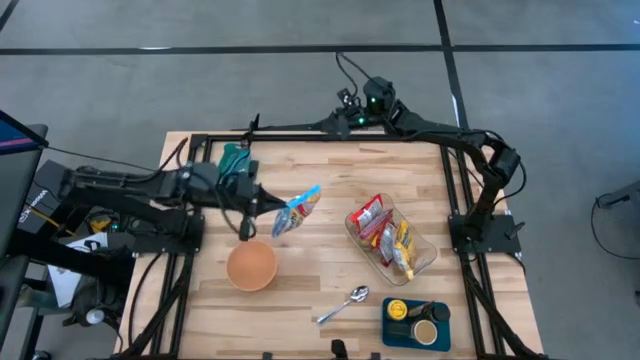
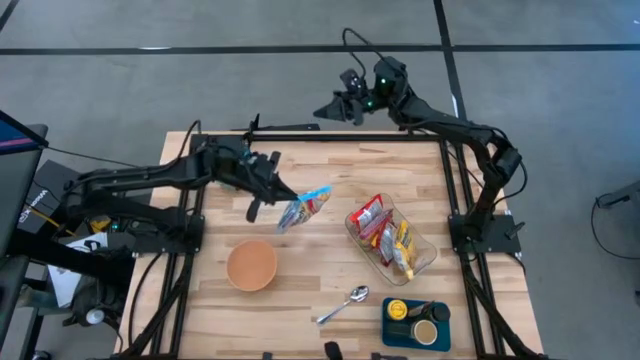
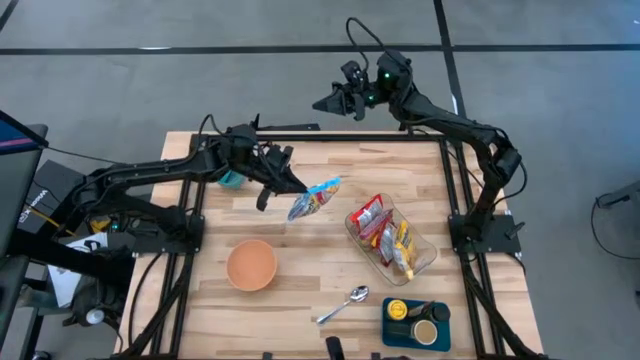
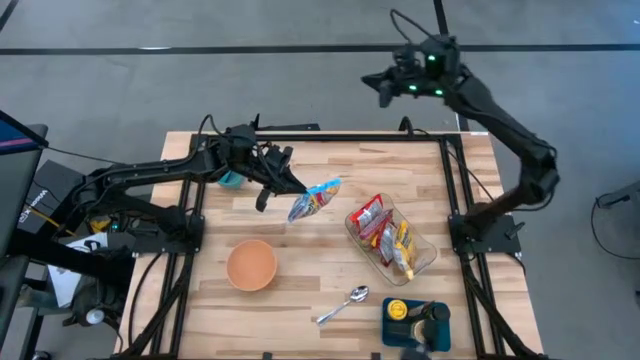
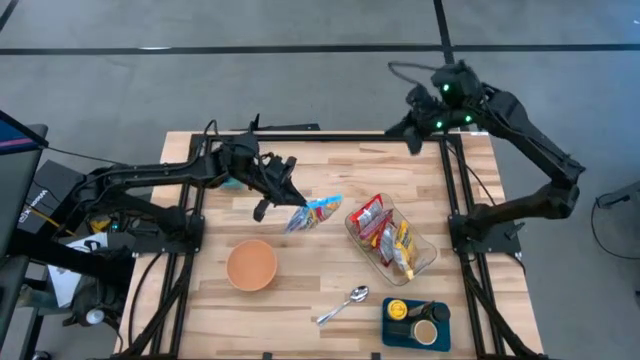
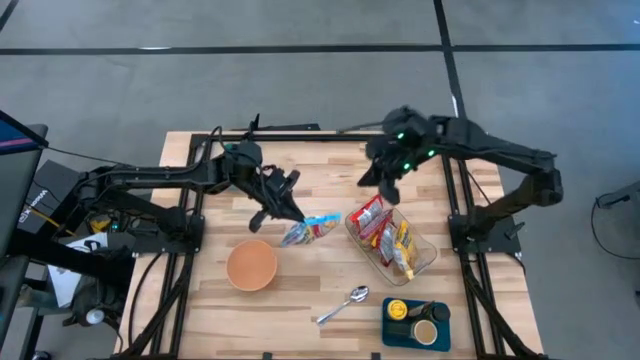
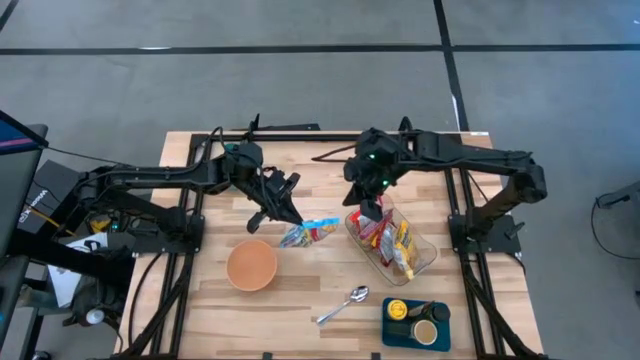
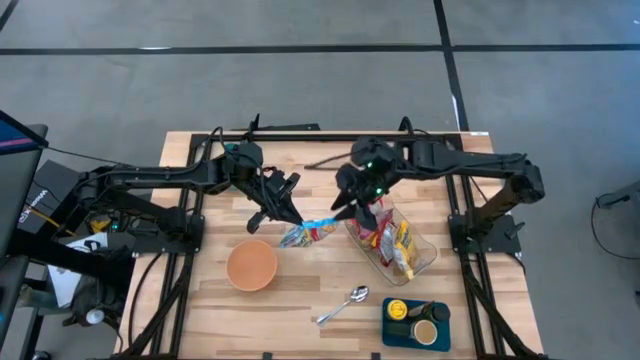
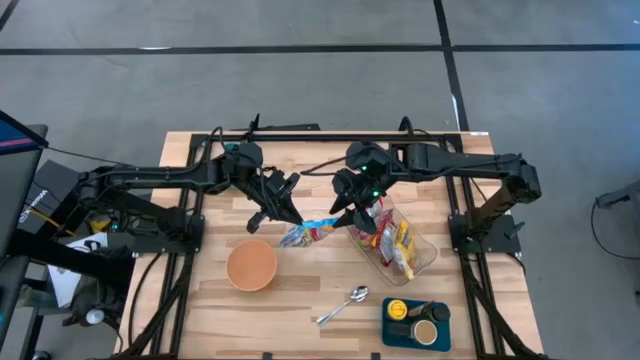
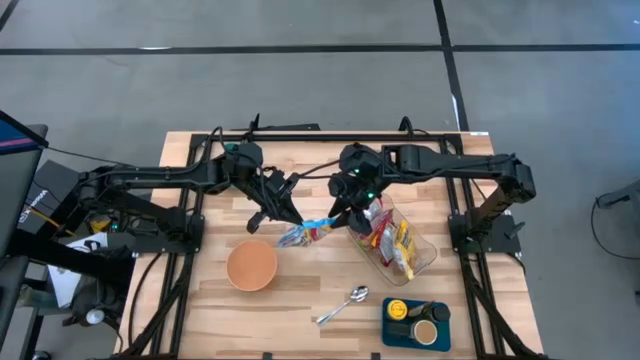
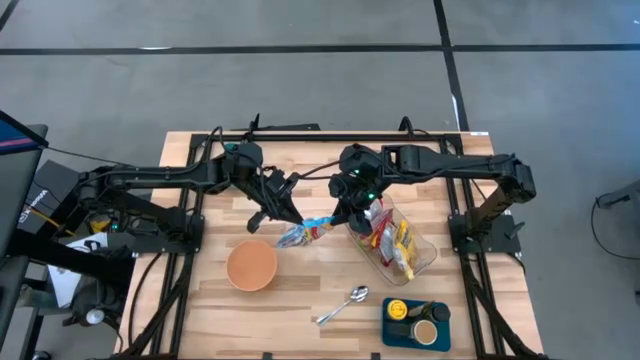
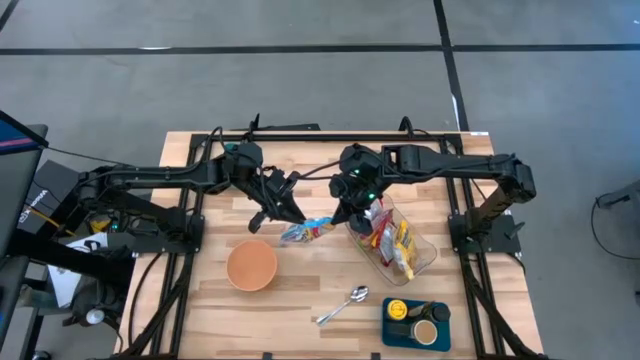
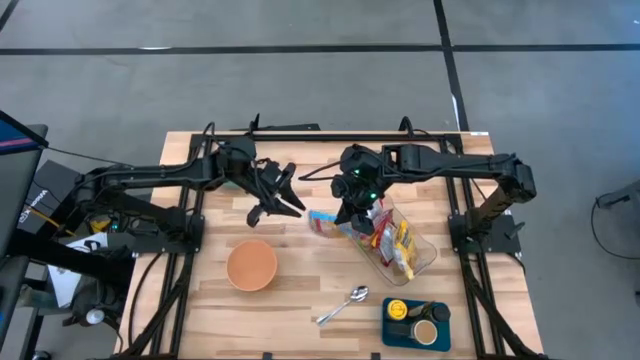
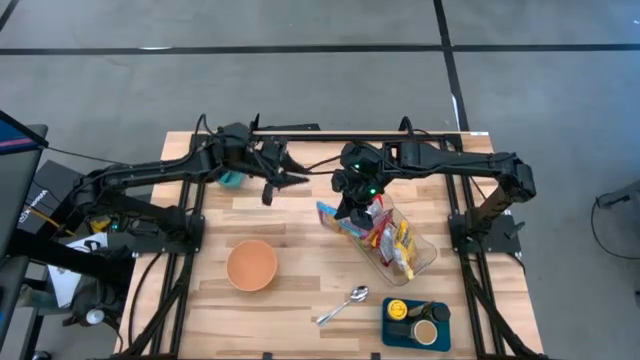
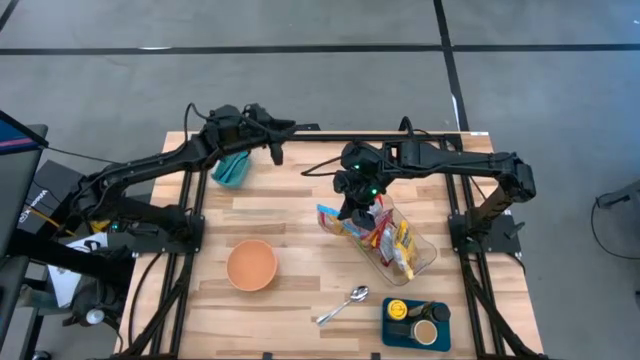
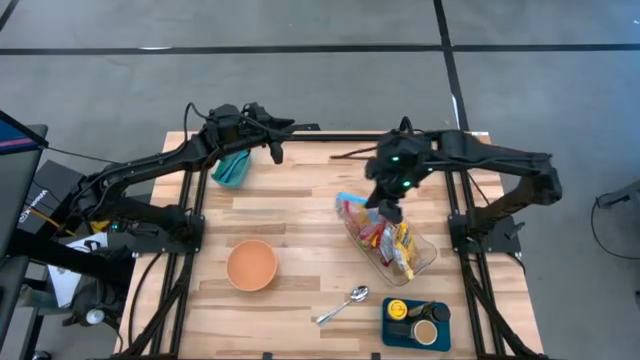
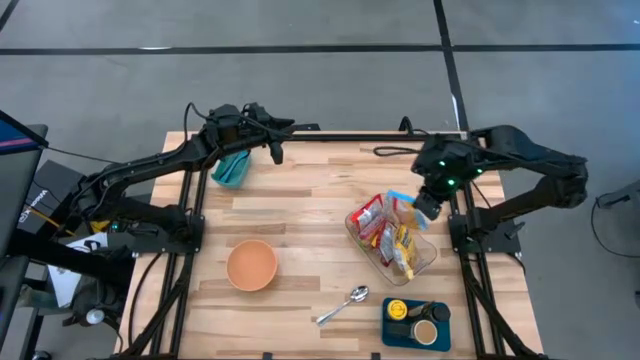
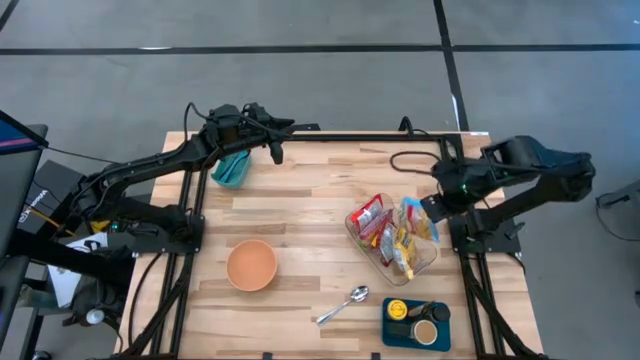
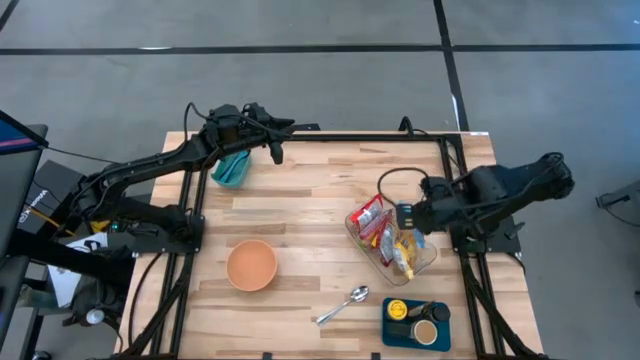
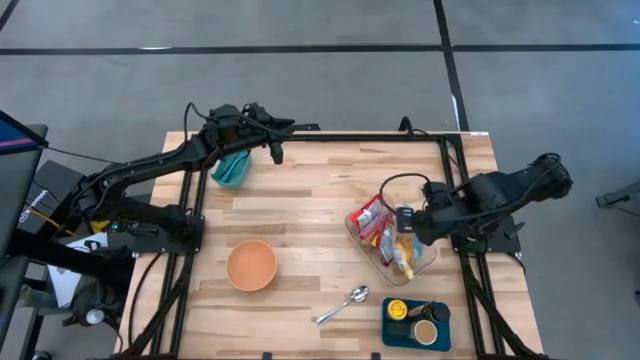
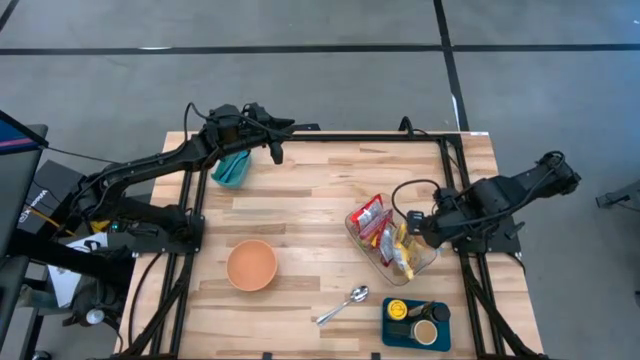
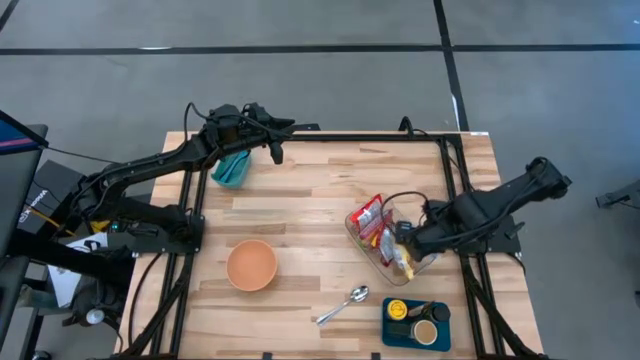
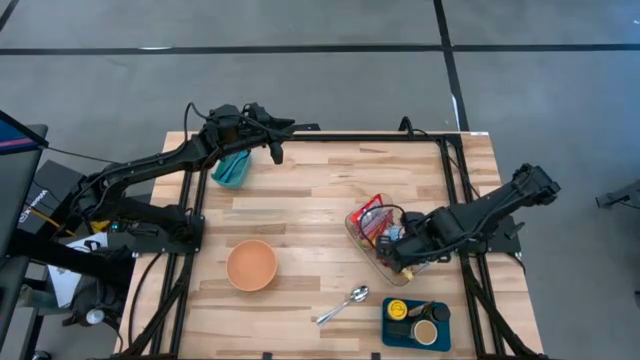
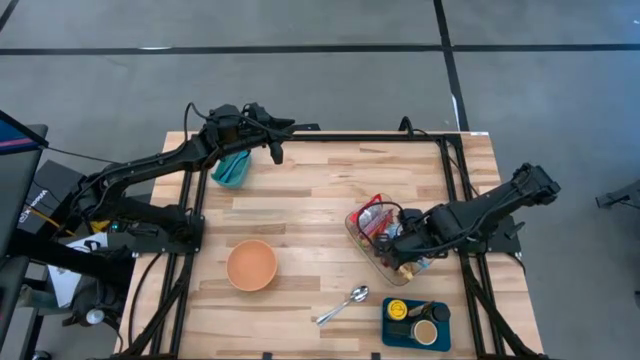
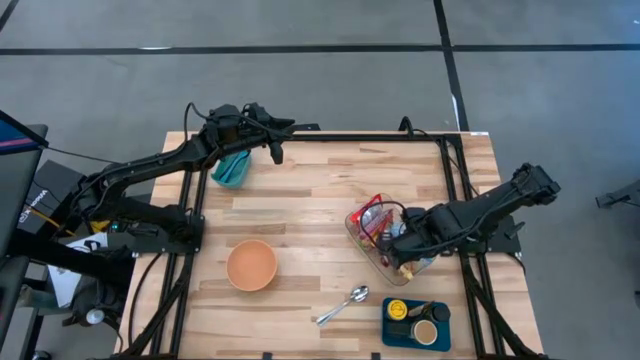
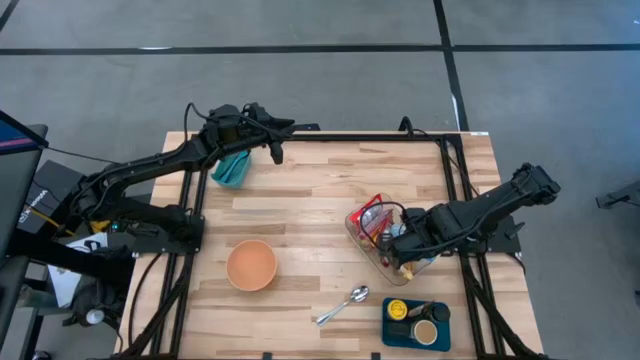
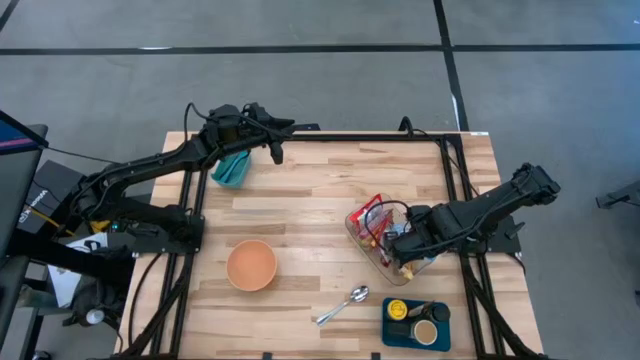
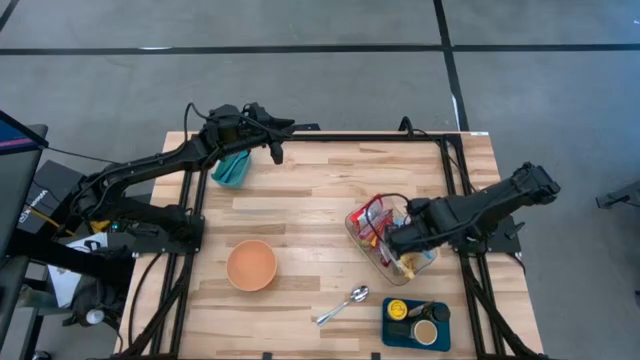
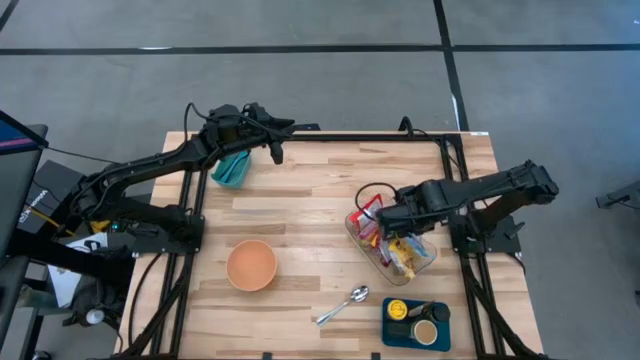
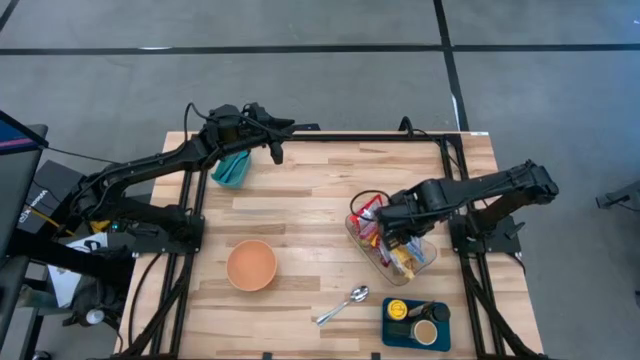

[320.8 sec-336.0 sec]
Task: Pick & Place Food Item
Put the blue noodle pack into the transparent bin

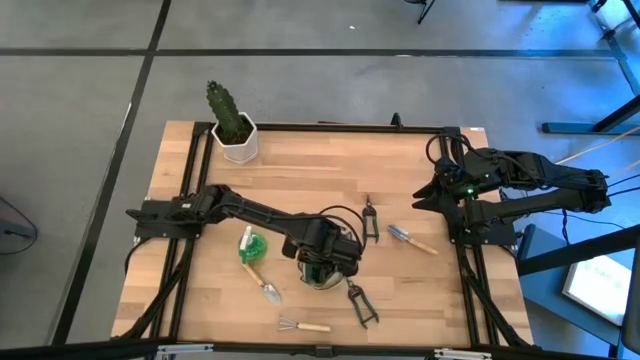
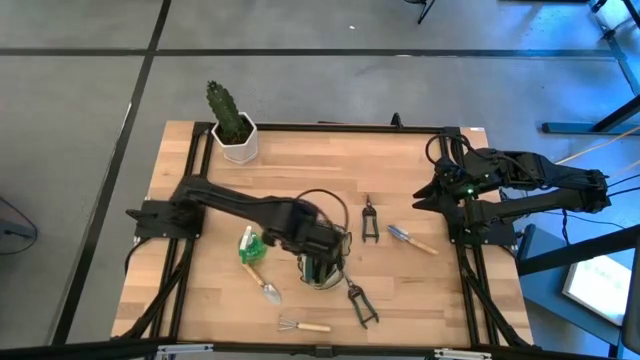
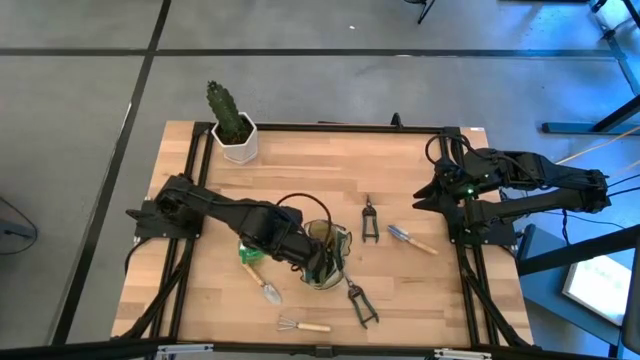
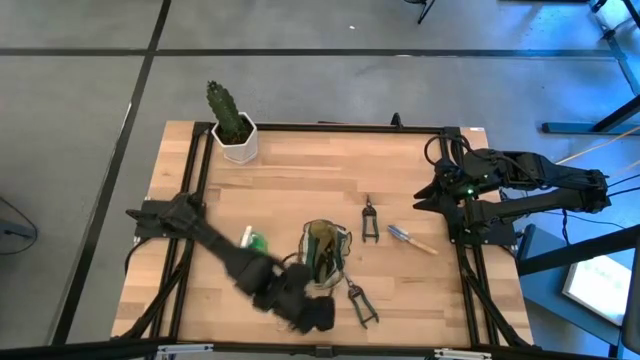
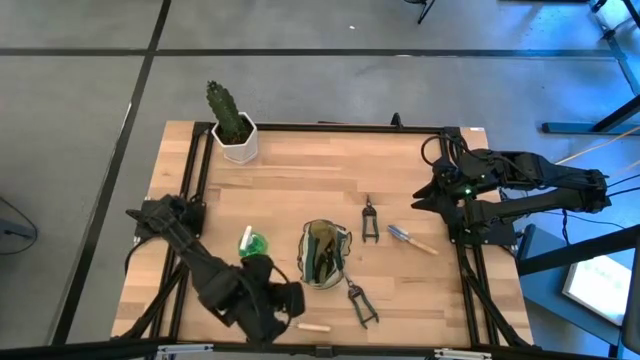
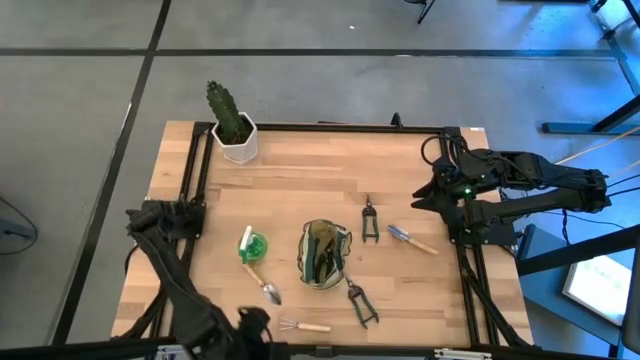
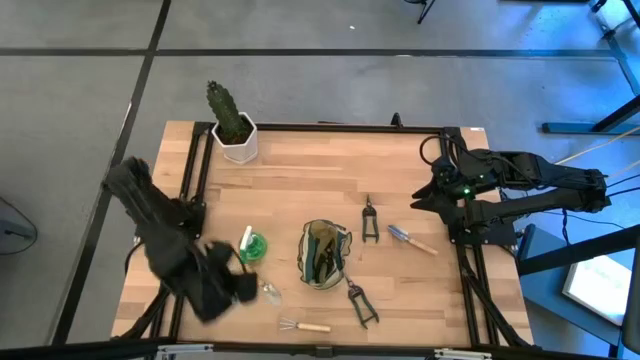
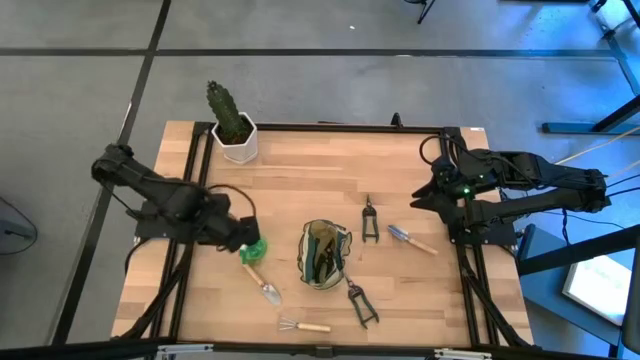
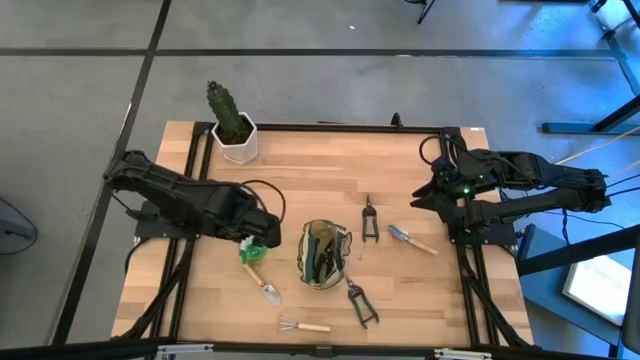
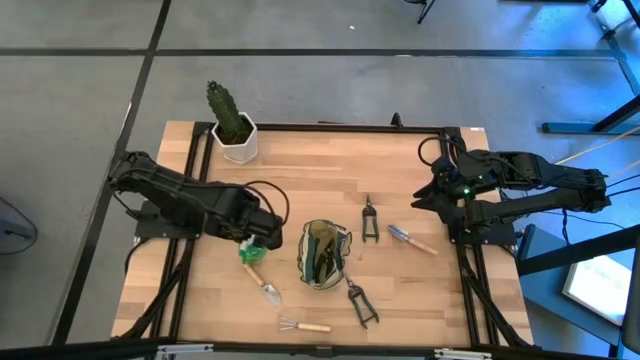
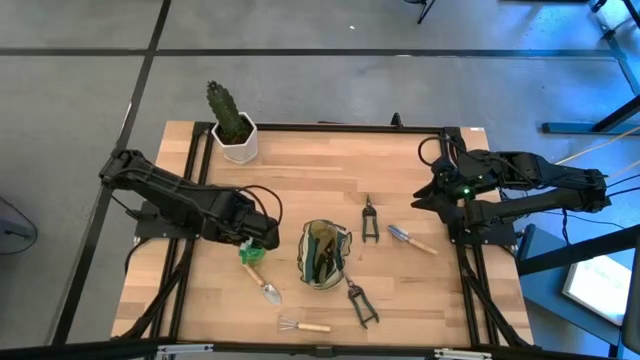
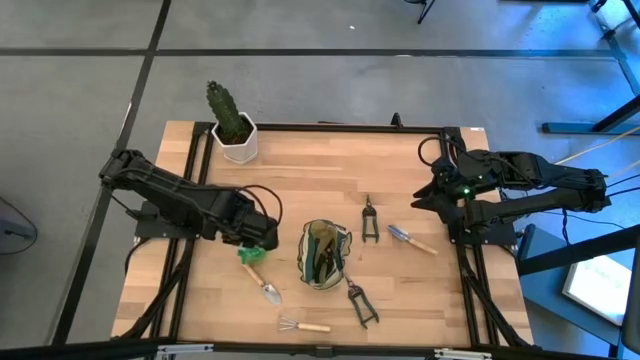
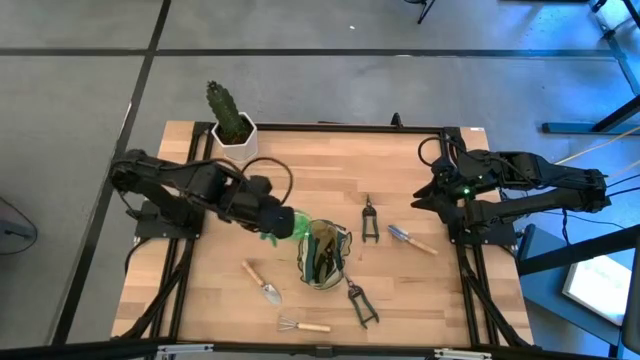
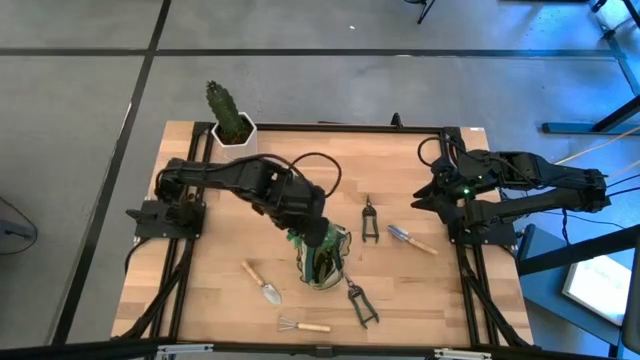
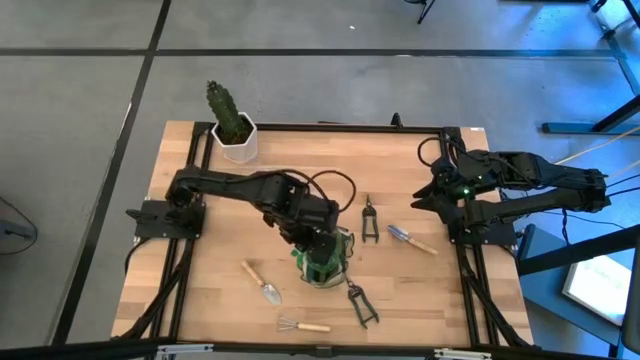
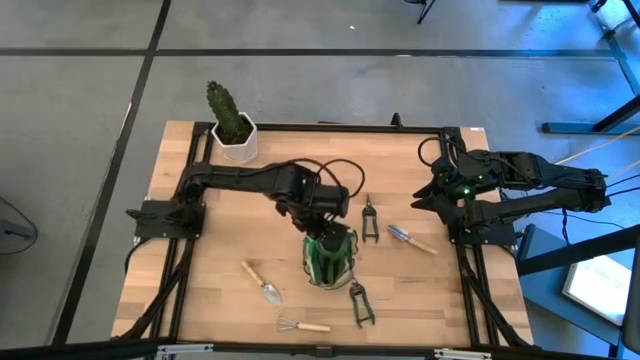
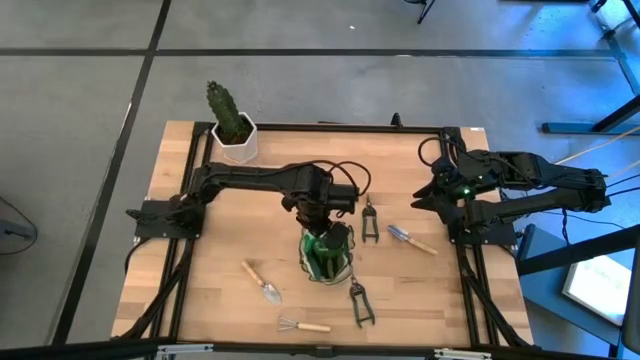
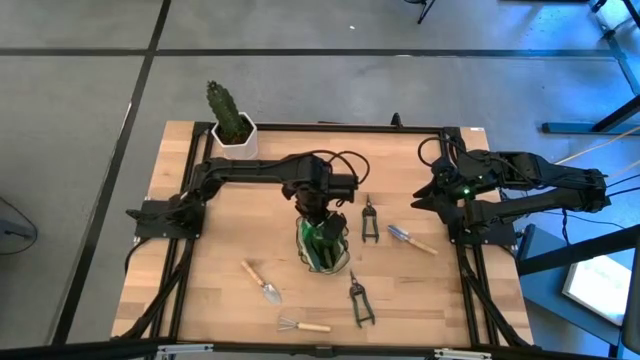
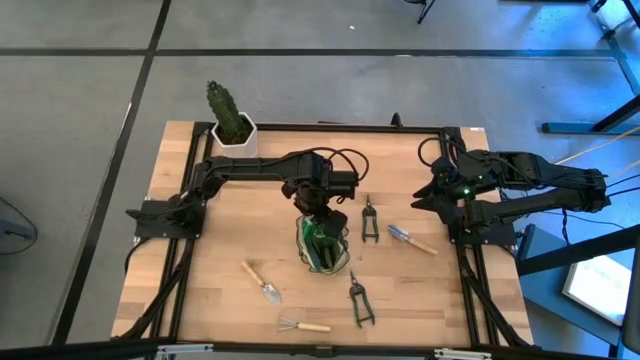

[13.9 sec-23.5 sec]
Task: Pick & Place Garden tools in Gardening bag
Put the green spray bottle into the gardening bag
